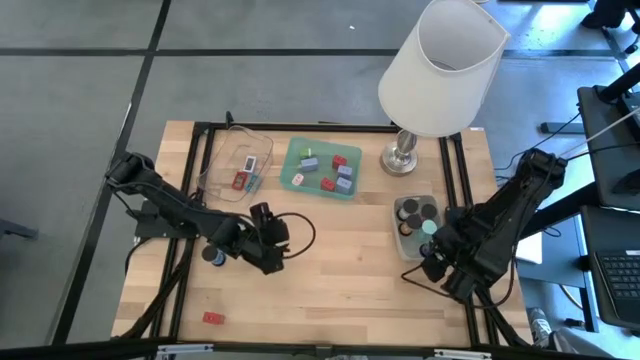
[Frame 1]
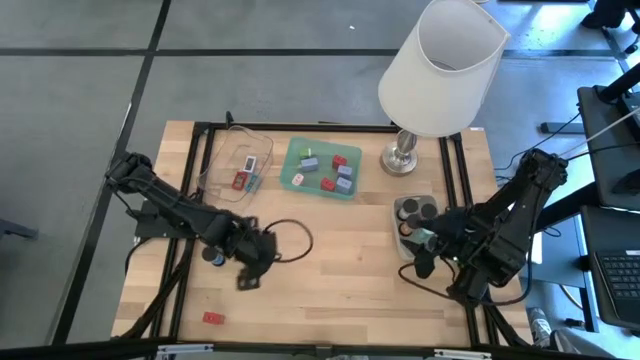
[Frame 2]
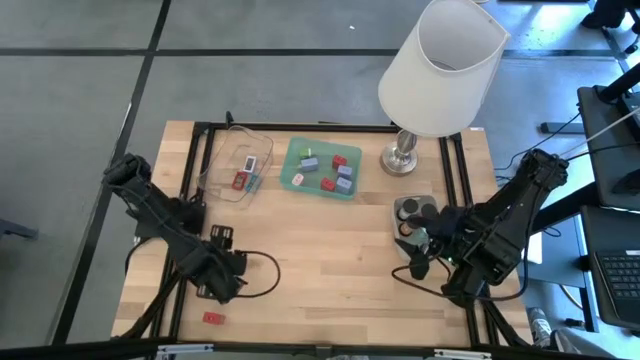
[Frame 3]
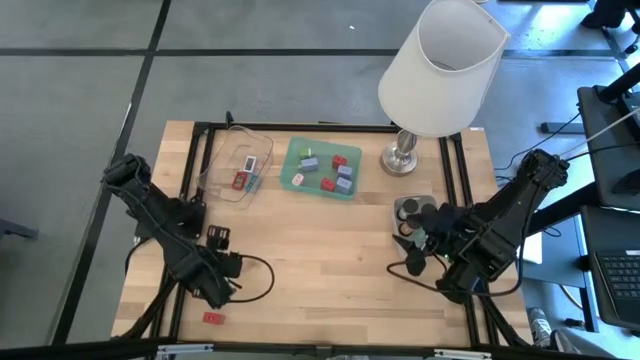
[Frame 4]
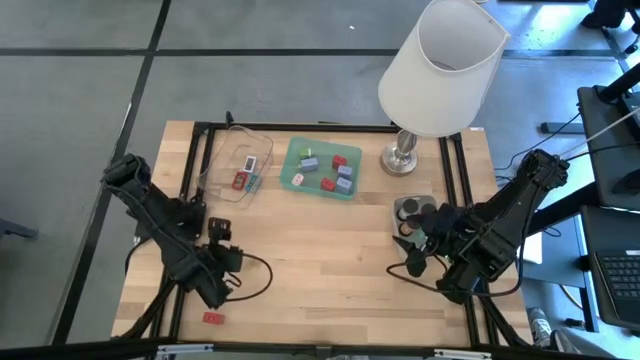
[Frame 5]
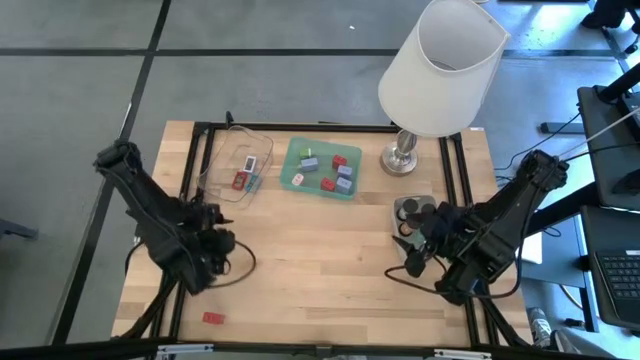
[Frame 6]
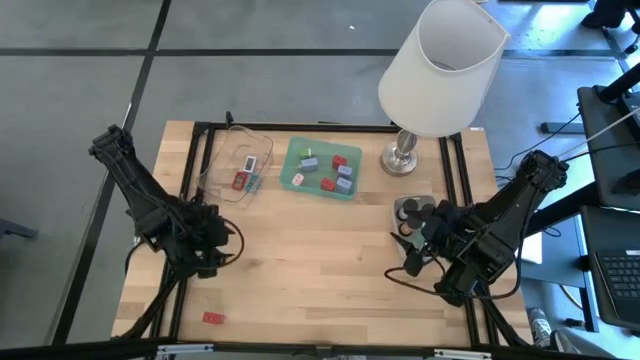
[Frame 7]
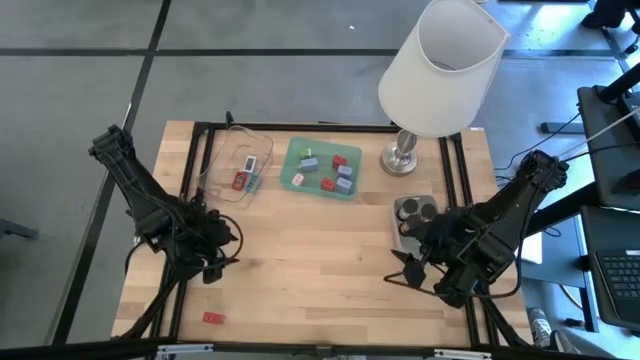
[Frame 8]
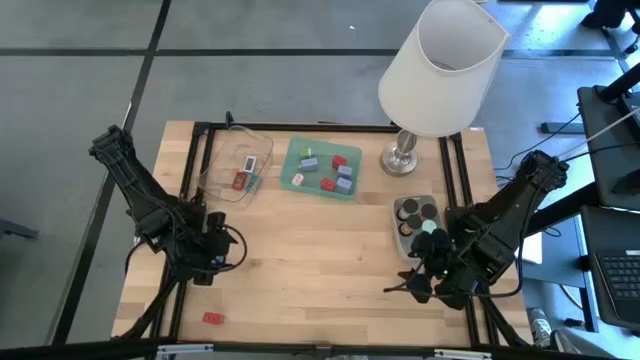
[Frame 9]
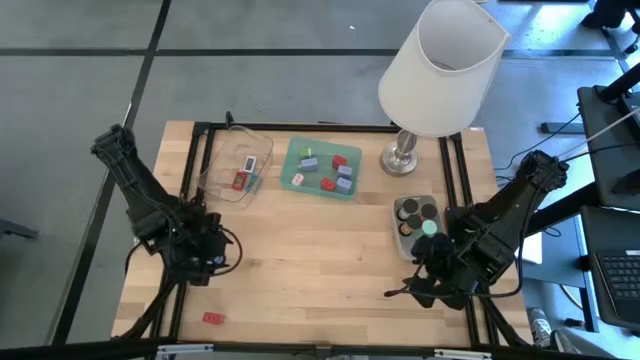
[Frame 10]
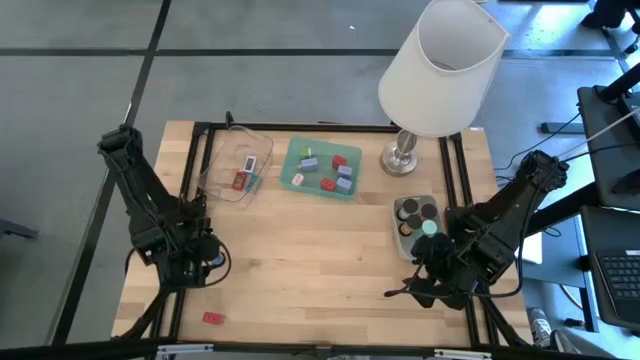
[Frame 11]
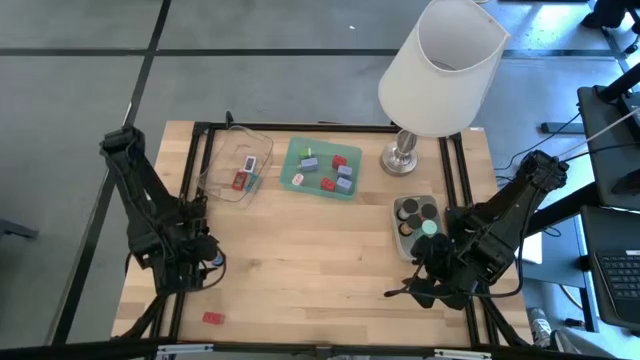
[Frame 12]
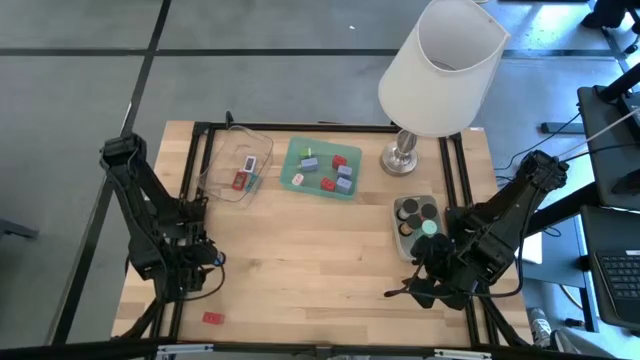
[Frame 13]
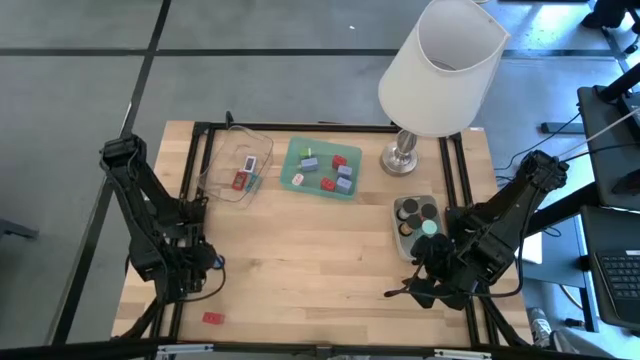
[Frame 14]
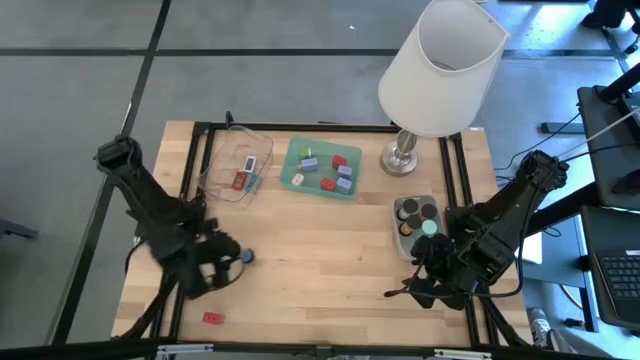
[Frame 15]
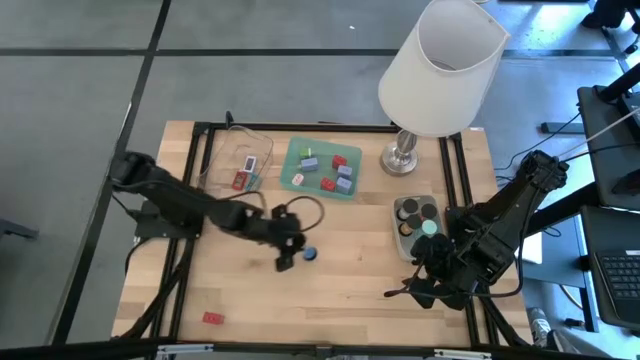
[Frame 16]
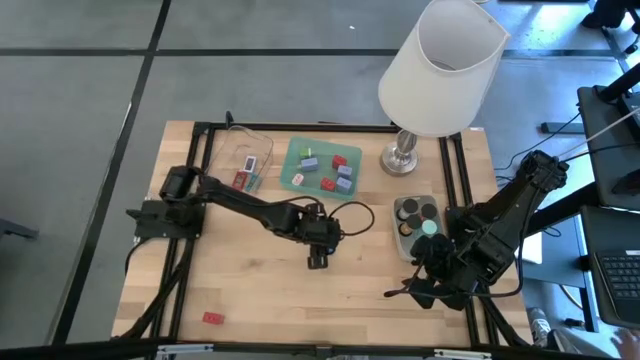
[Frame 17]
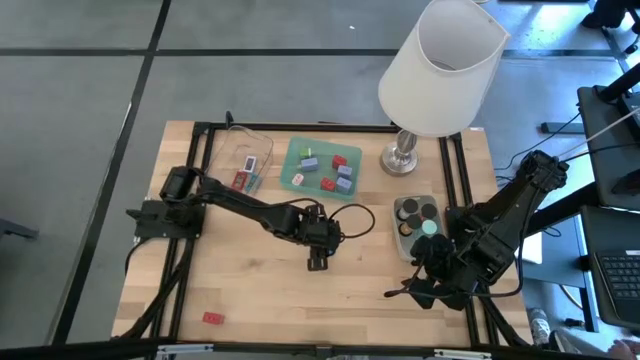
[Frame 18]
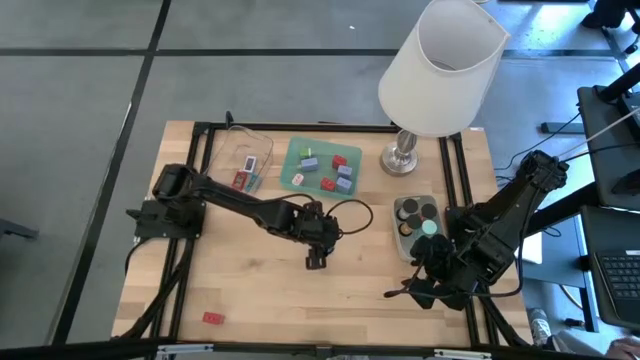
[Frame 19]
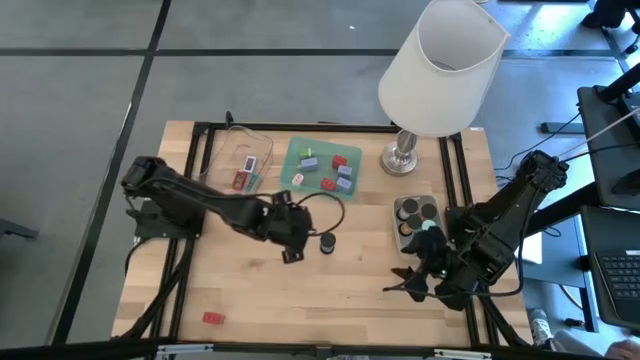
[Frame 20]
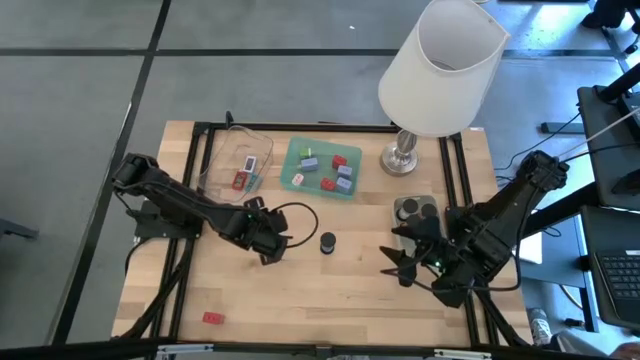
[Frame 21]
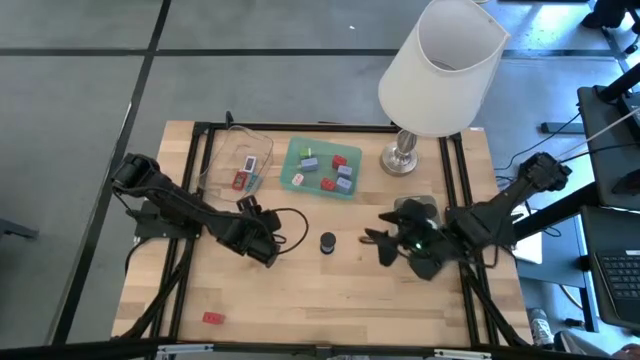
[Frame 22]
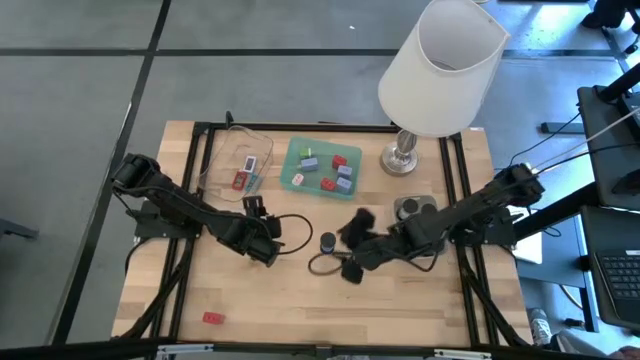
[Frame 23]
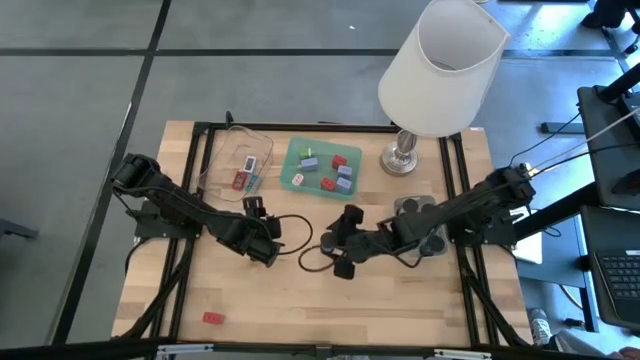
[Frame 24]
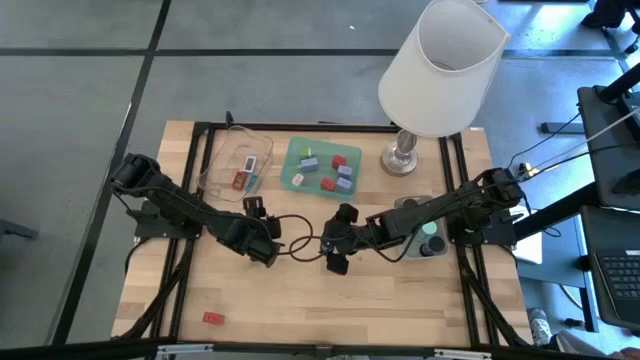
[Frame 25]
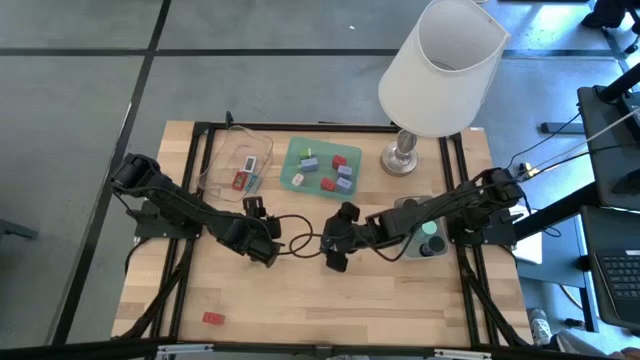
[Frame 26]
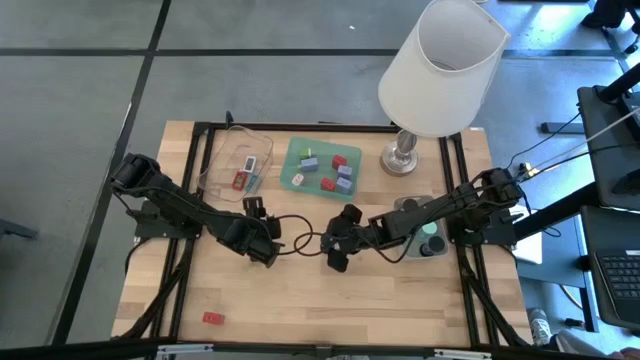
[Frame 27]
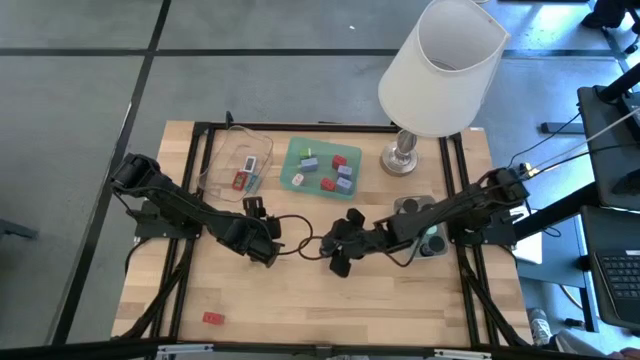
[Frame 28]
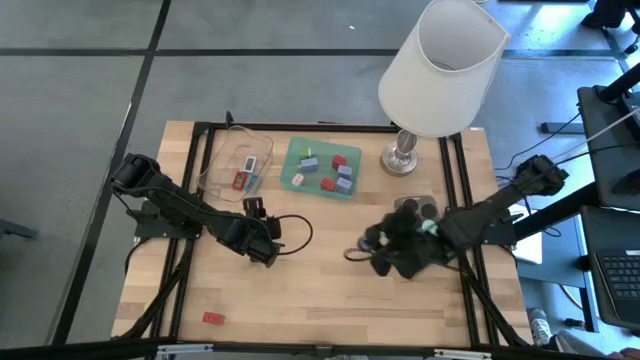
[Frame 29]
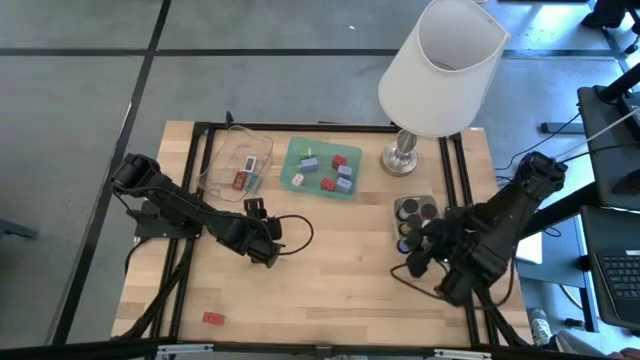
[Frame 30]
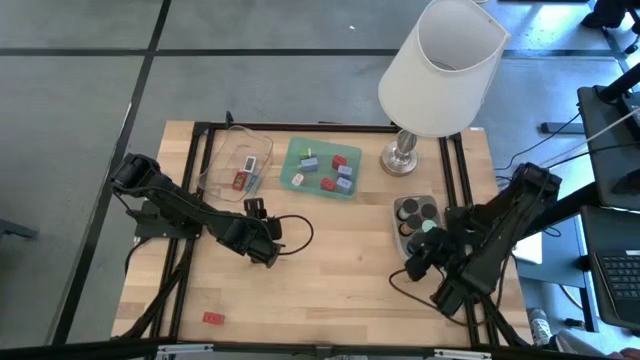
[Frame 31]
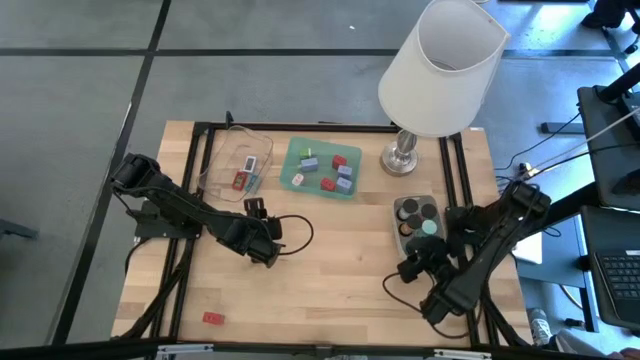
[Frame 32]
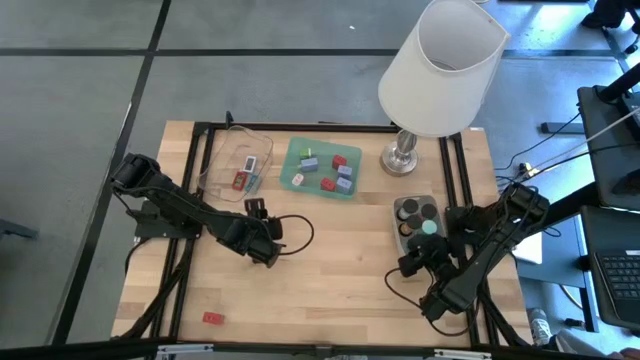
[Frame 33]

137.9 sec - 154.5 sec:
Task: Pick & Place Office items
Put the blue hourglass into the gray bin

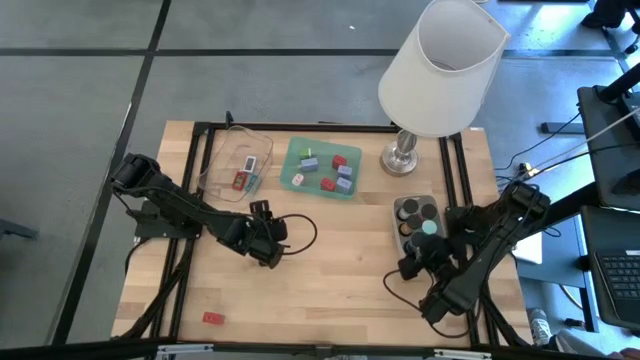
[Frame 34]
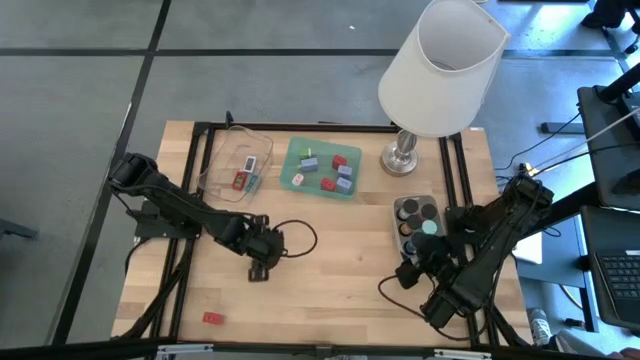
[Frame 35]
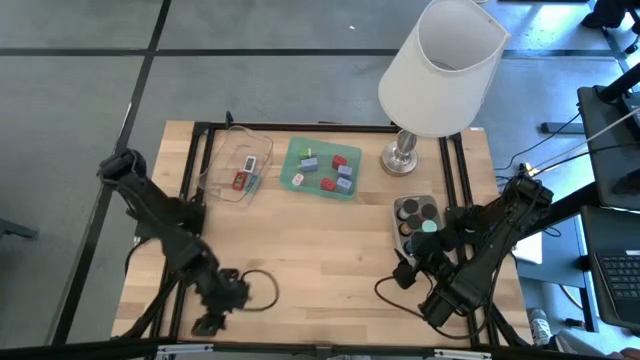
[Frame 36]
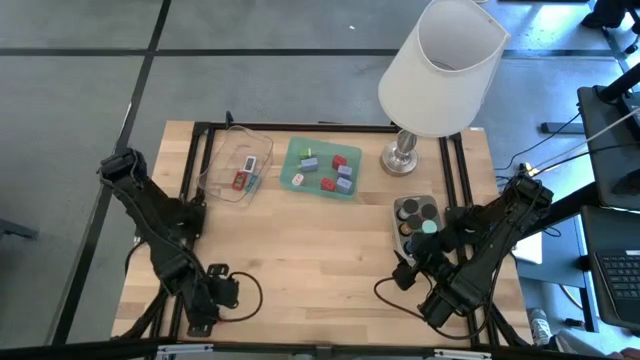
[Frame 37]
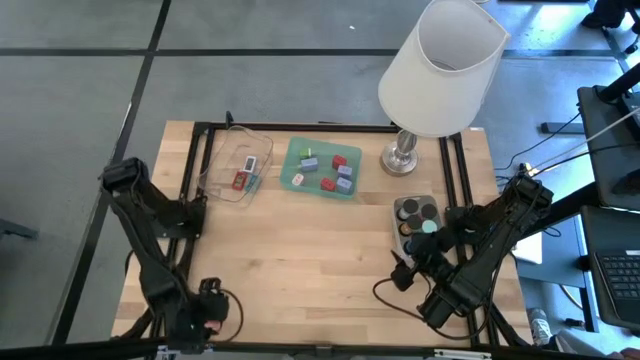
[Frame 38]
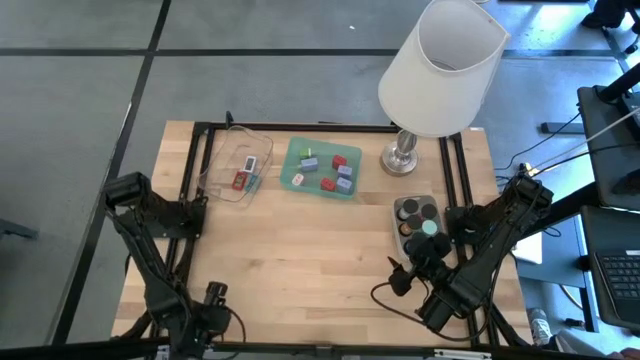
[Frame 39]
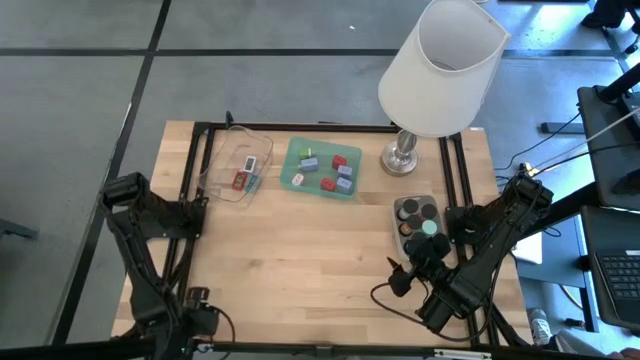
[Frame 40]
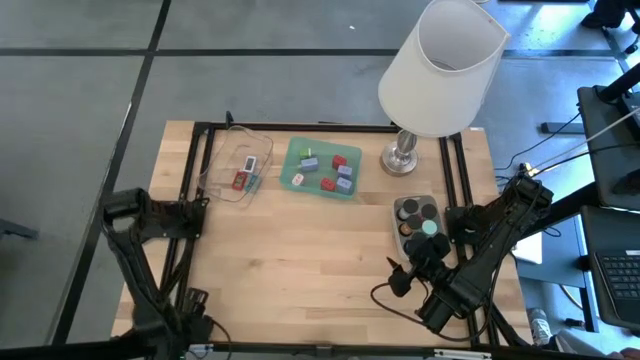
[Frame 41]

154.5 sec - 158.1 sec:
Put the red charger adapter into the green bin
